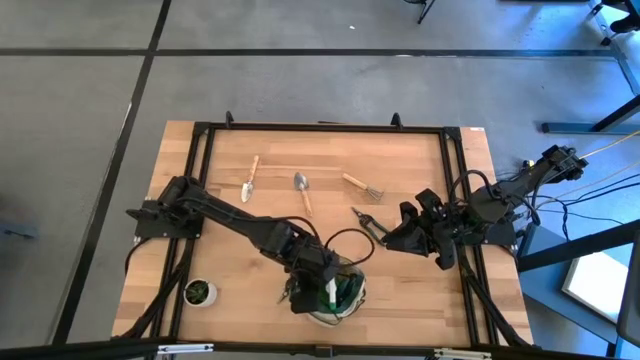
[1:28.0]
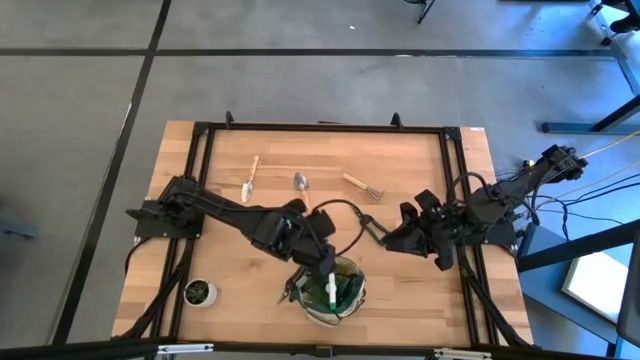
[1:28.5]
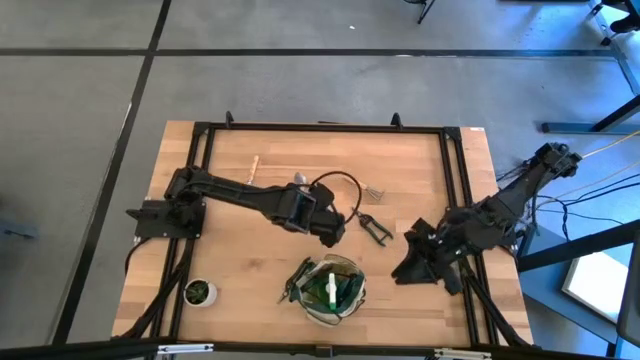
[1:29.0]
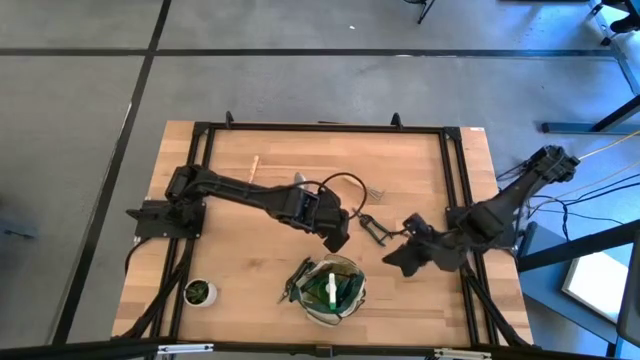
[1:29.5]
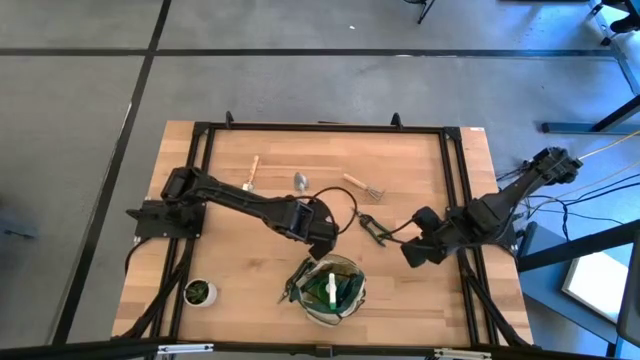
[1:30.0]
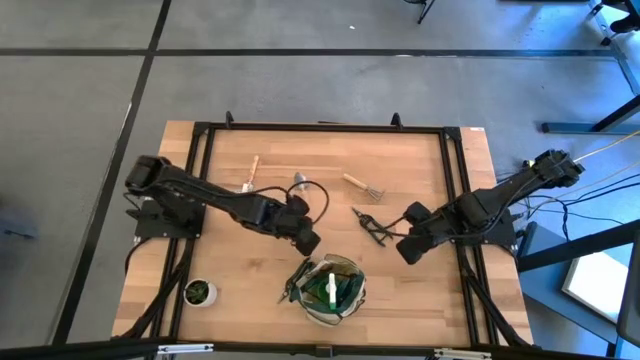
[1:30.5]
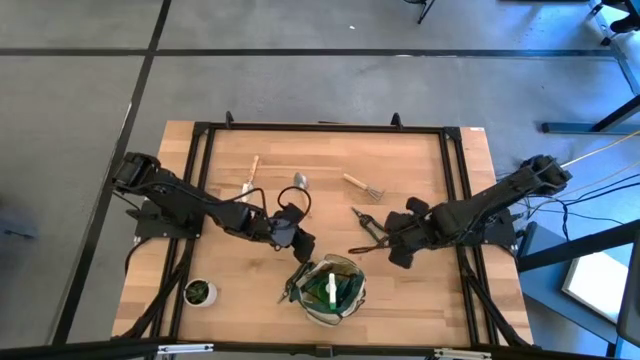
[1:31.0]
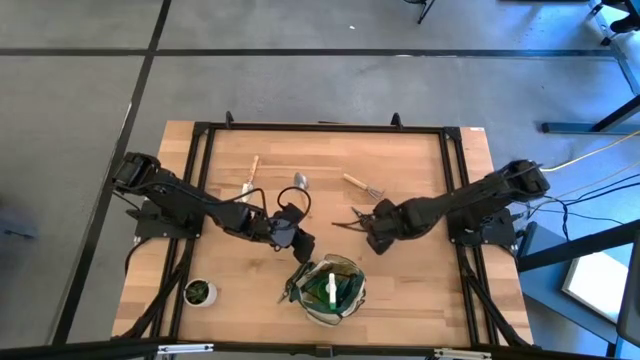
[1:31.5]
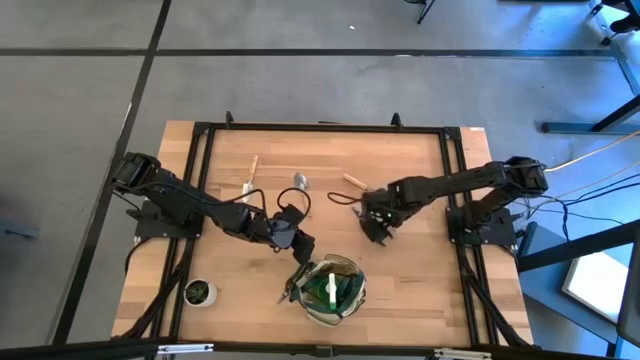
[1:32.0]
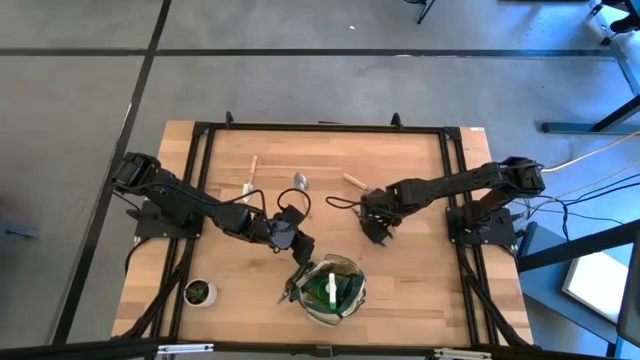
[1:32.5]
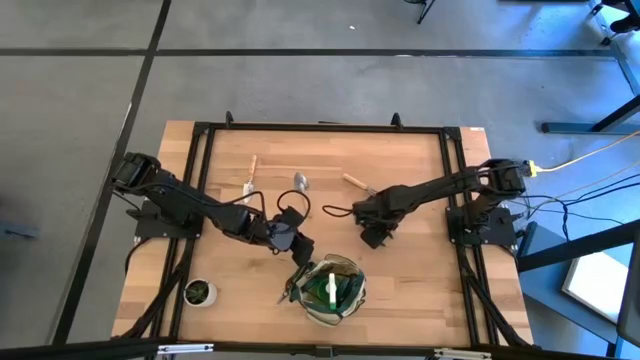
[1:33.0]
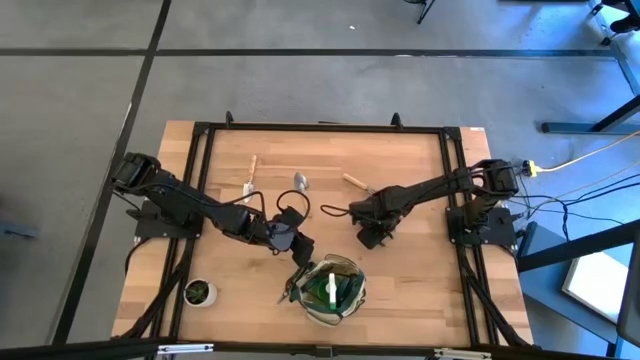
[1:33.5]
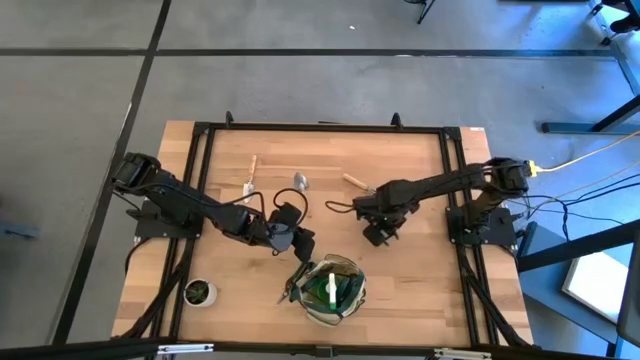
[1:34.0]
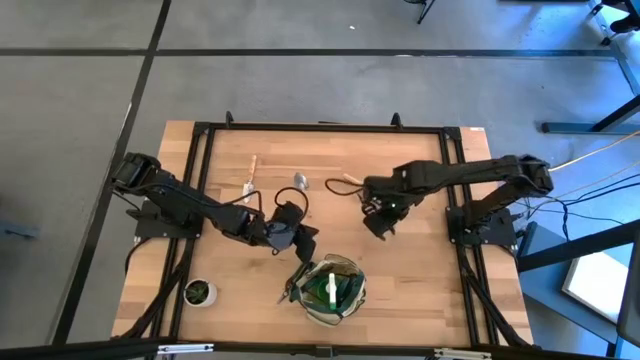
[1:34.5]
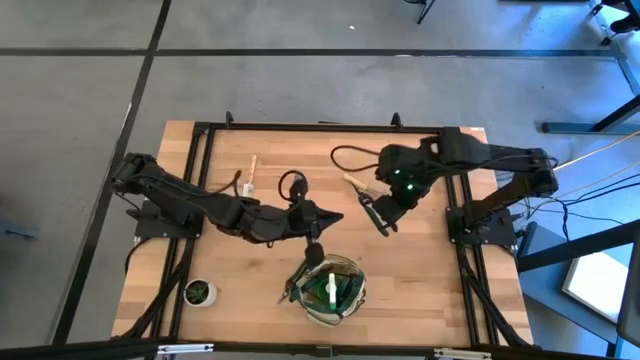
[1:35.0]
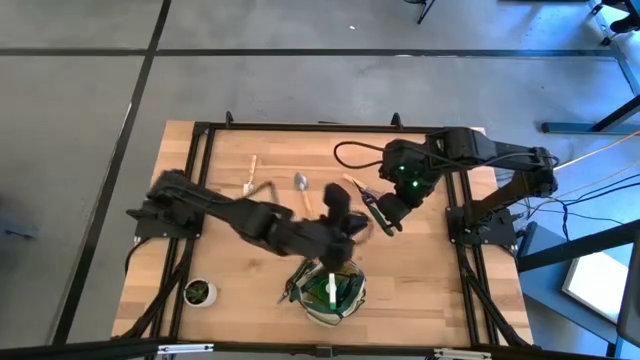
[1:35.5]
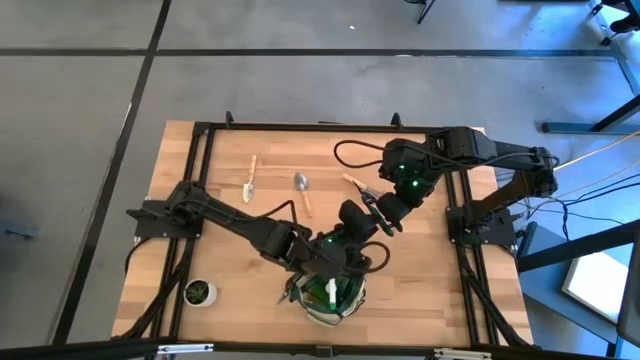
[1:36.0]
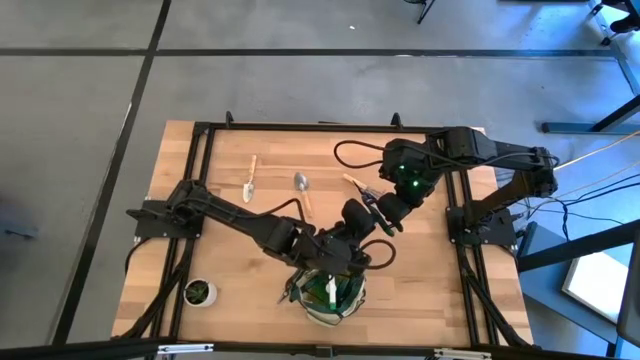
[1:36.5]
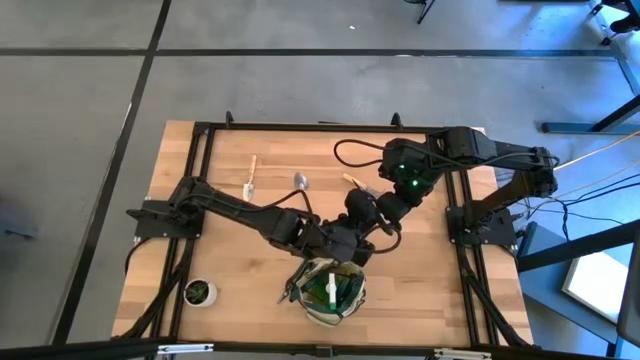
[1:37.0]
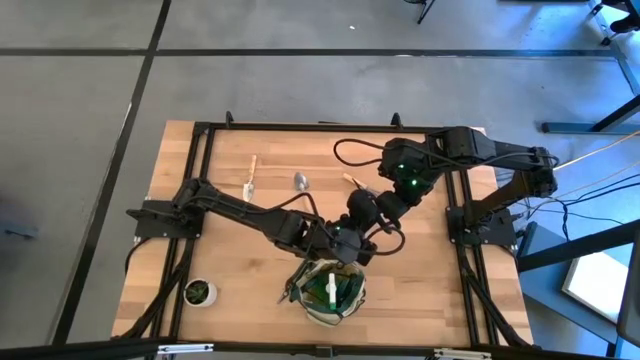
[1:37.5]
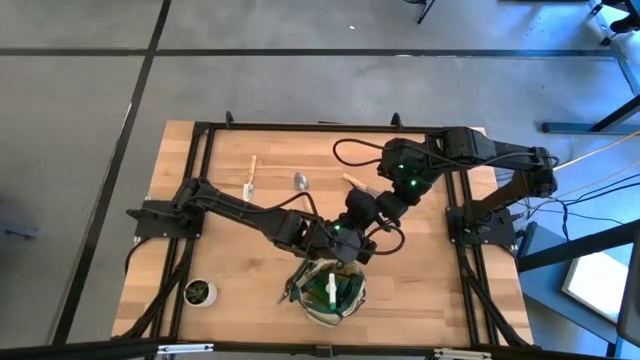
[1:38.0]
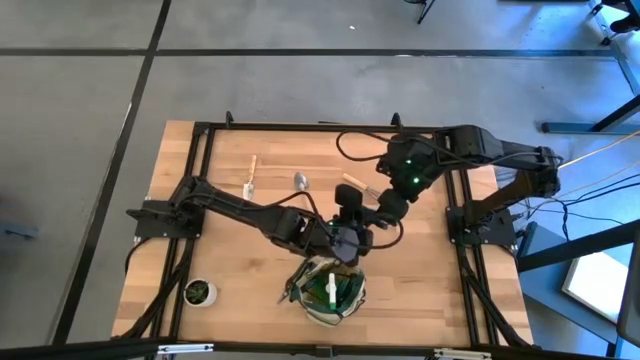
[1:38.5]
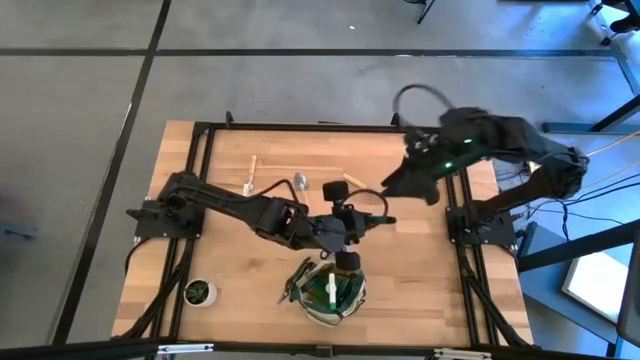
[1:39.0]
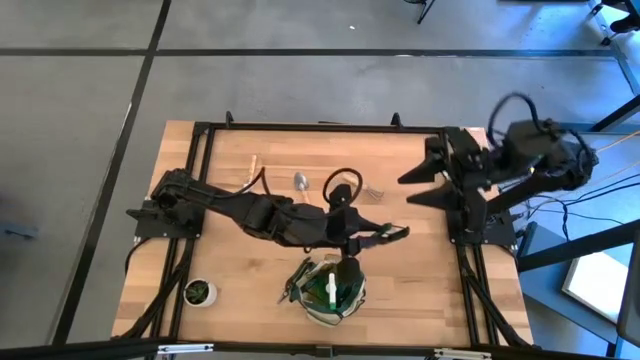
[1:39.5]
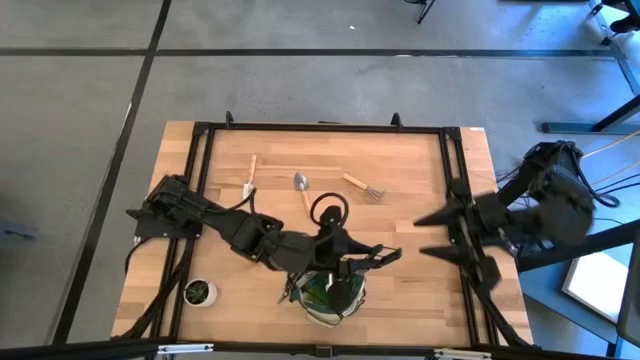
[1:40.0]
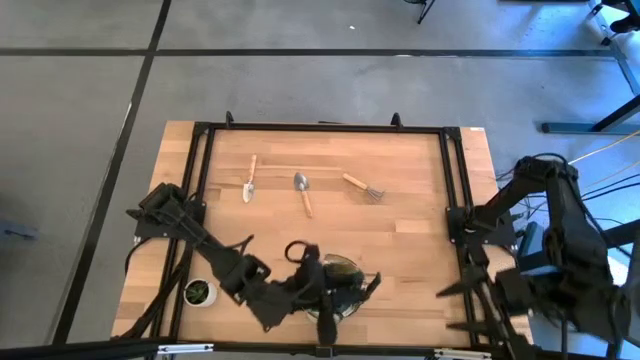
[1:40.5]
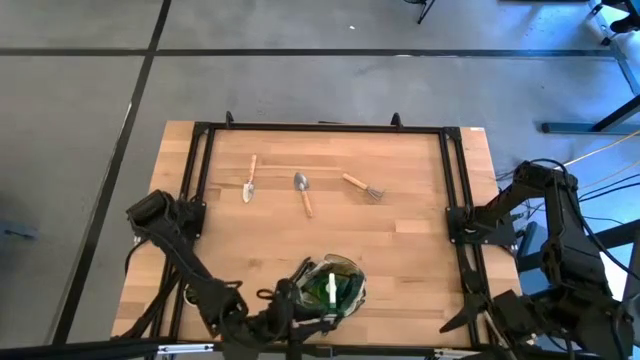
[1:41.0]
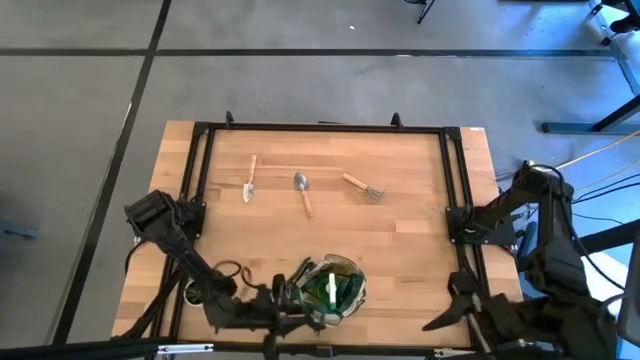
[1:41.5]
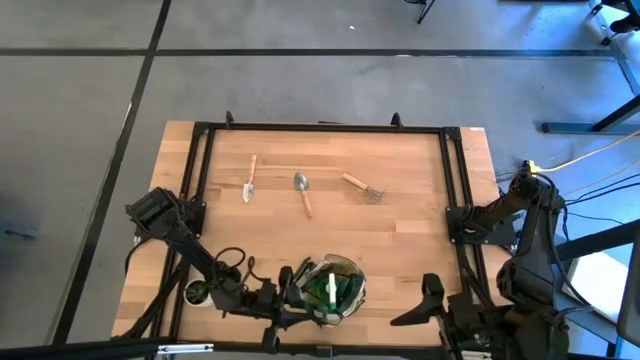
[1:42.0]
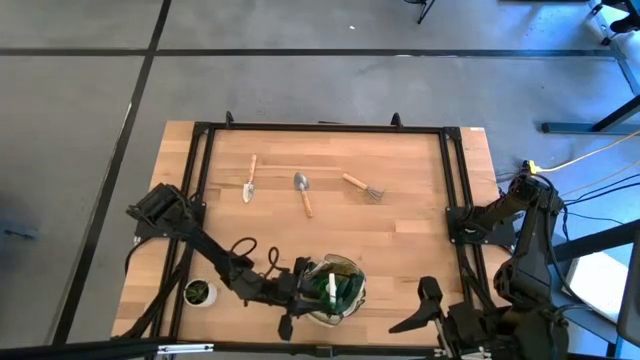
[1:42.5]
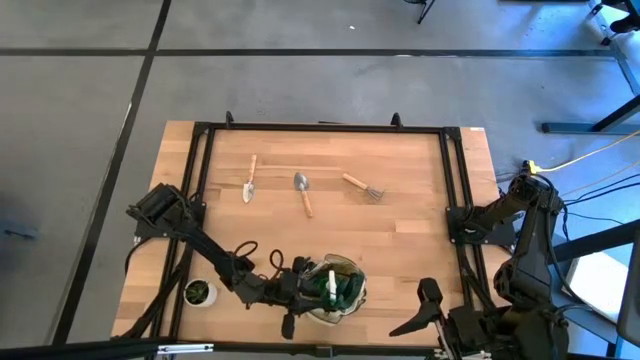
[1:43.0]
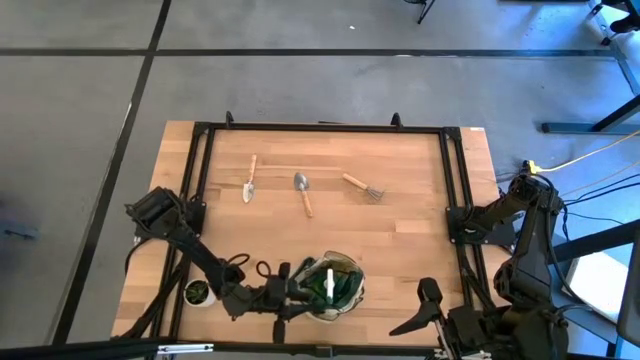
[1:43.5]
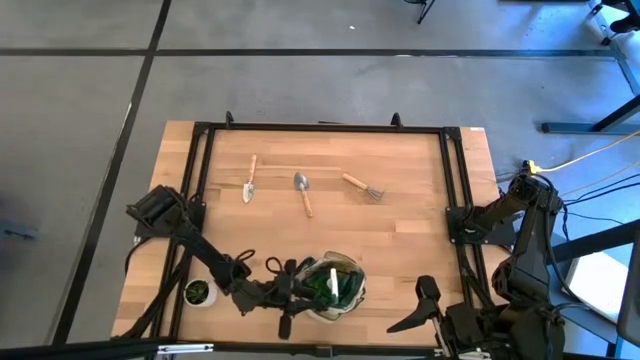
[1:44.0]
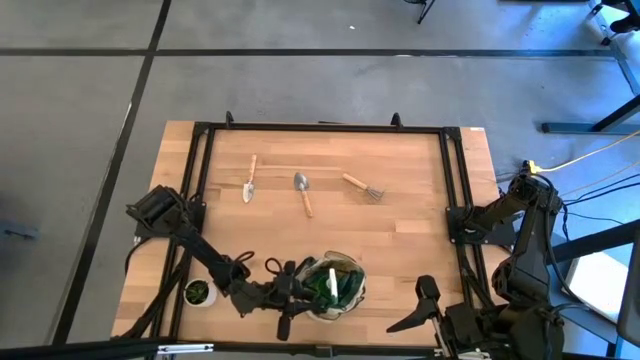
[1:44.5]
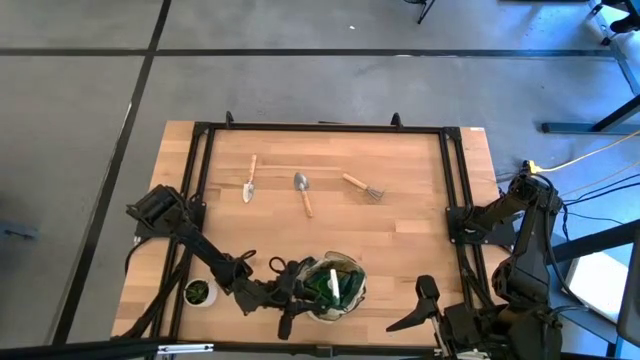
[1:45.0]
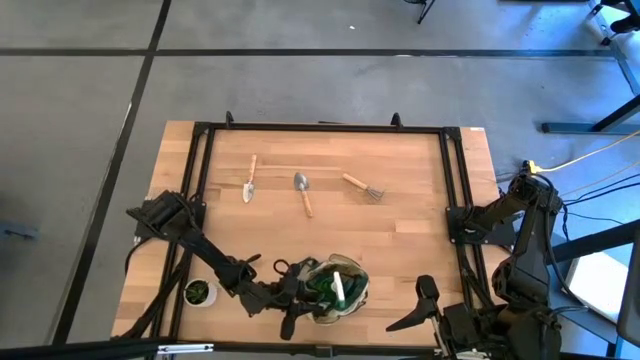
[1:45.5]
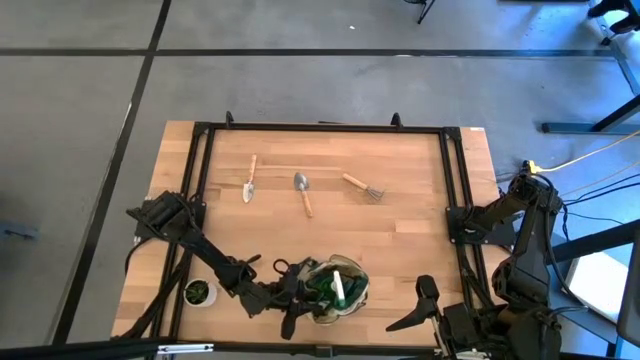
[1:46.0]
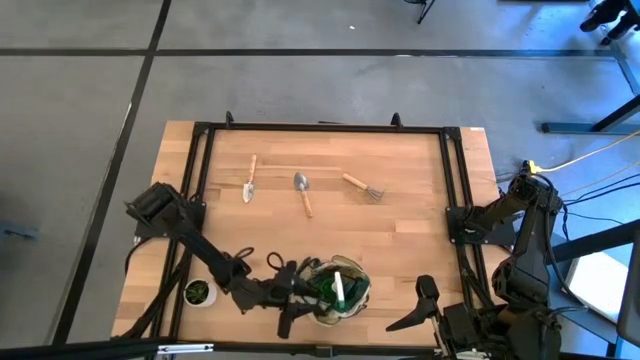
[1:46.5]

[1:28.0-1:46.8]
Task: Pick & Place Garden tools in Gardening bag
Put the top green fruit pruner into the gardening bag
